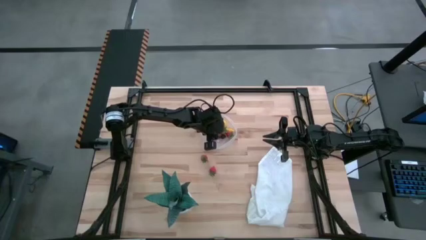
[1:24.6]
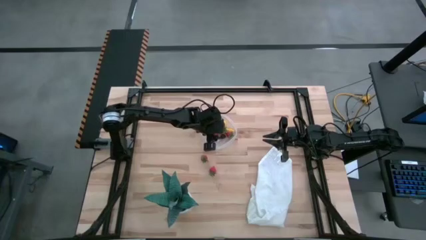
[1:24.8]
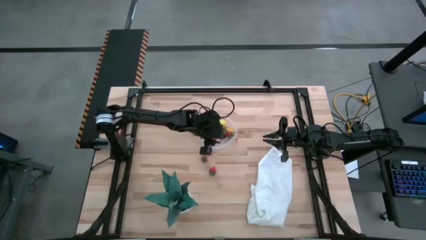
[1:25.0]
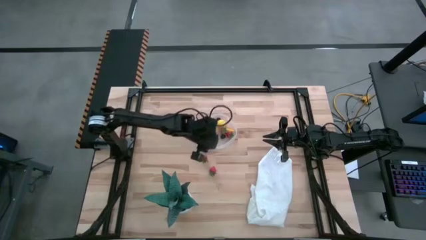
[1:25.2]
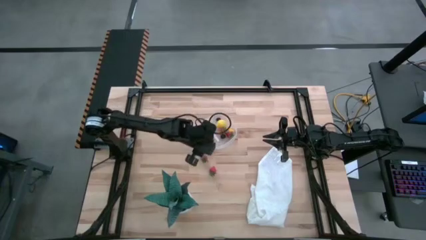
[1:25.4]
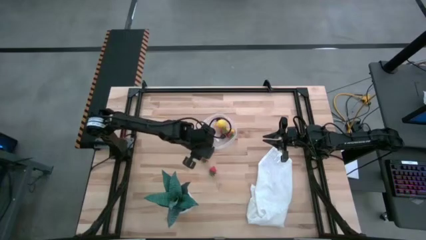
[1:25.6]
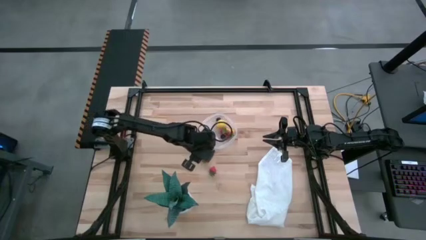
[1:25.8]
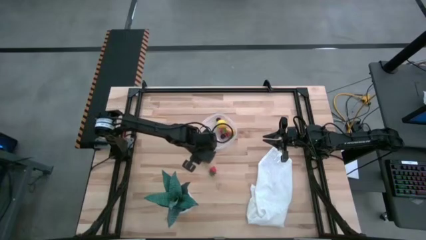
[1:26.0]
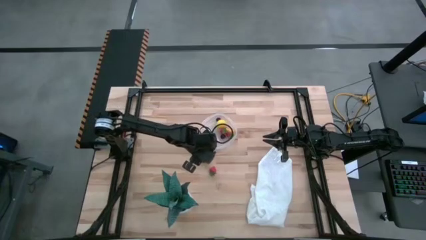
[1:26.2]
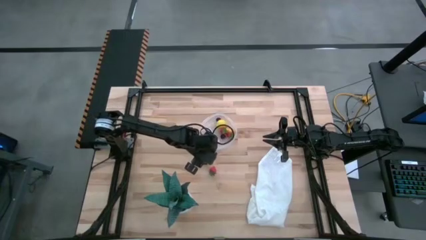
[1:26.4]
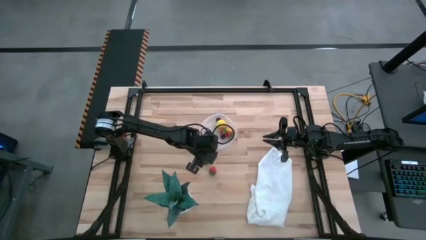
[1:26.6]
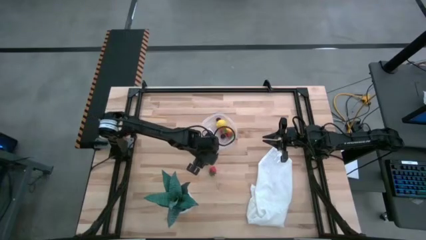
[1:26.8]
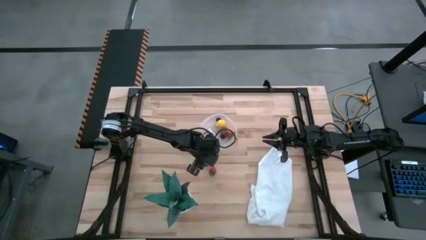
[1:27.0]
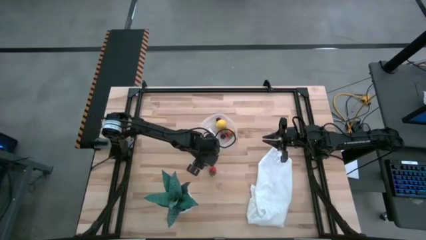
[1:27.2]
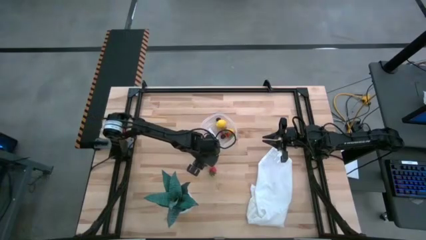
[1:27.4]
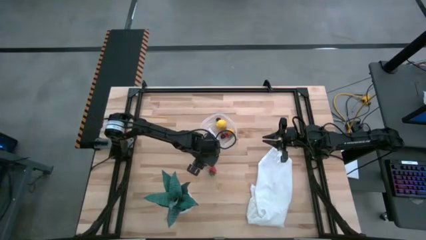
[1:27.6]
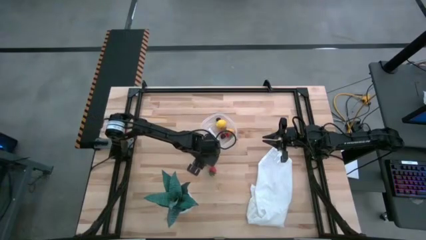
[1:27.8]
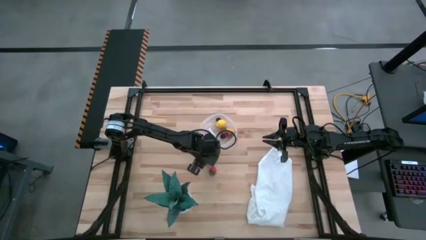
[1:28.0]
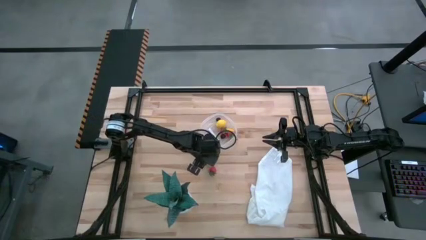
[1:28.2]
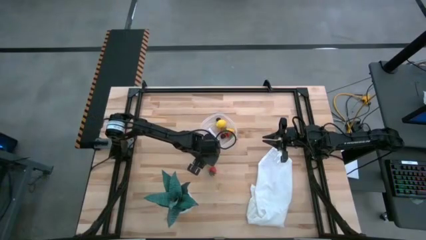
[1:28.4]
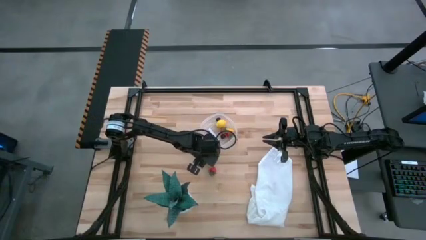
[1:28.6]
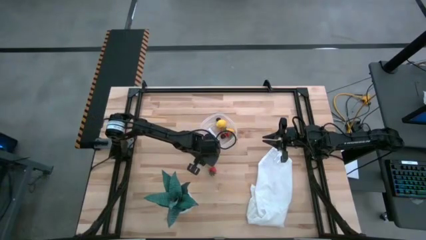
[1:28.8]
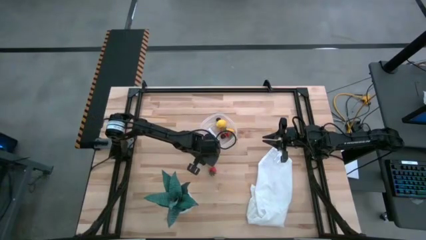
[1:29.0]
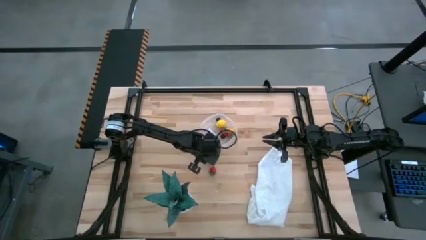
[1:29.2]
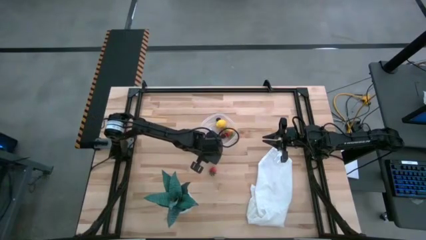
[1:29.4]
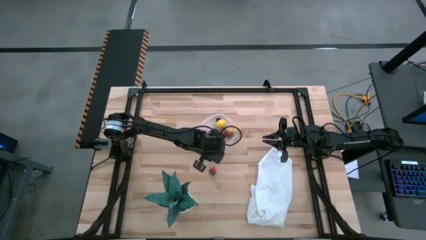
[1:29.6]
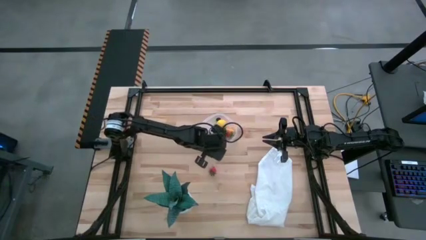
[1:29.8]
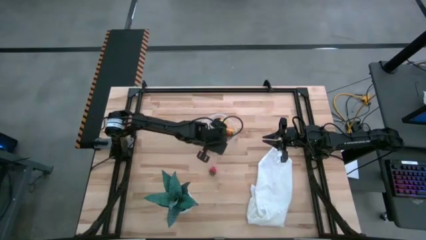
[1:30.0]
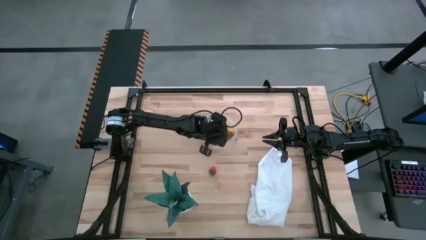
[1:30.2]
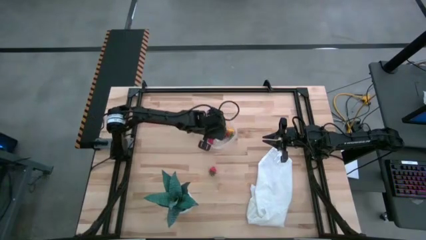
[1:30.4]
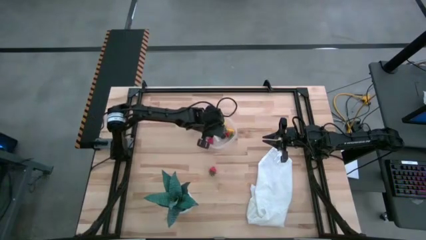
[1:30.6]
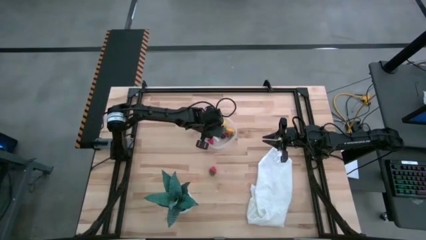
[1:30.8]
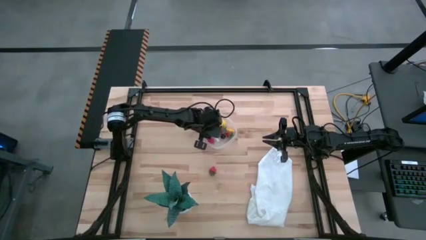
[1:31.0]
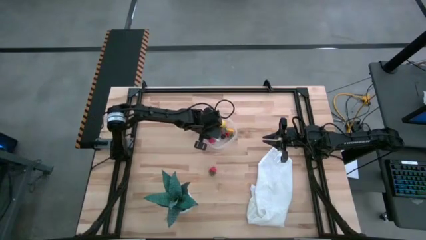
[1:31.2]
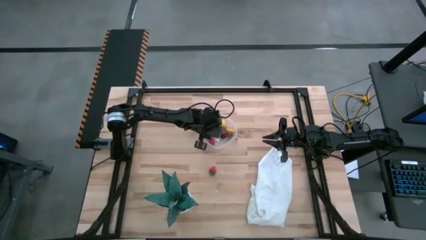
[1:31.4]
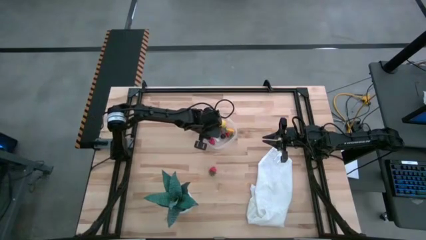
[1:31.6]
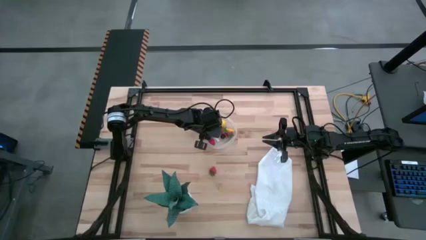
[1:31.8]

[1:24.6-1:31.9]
Task: Pick and placing Produce into tupperware
Put the strawberry into the bin

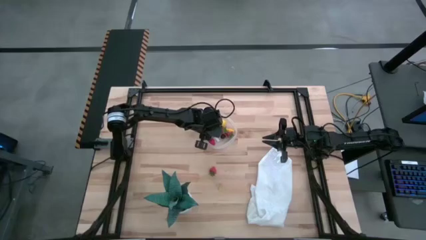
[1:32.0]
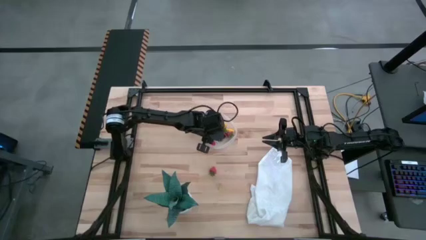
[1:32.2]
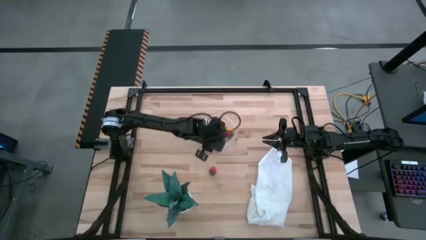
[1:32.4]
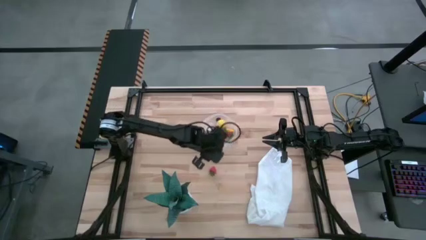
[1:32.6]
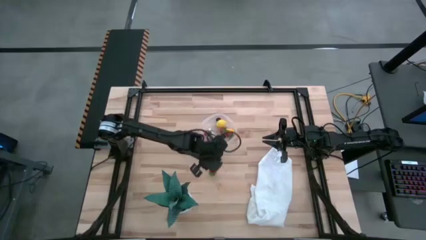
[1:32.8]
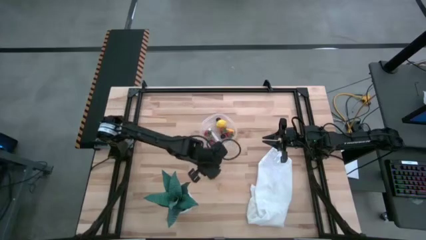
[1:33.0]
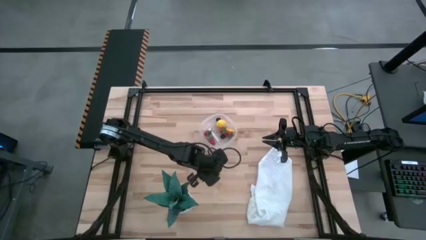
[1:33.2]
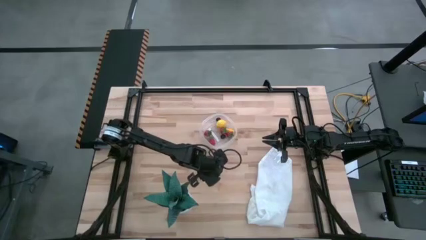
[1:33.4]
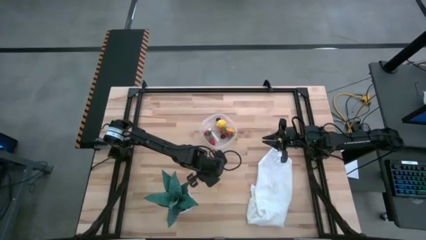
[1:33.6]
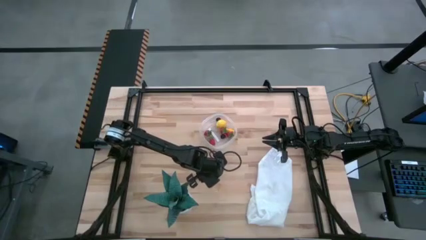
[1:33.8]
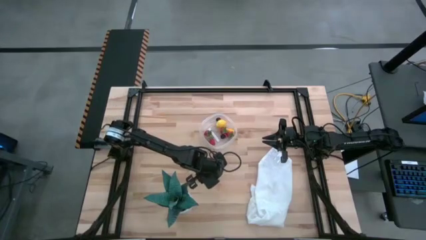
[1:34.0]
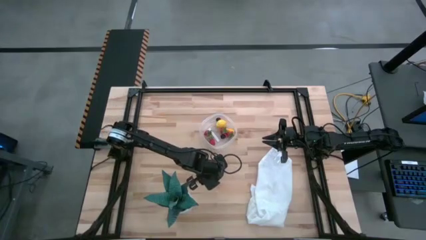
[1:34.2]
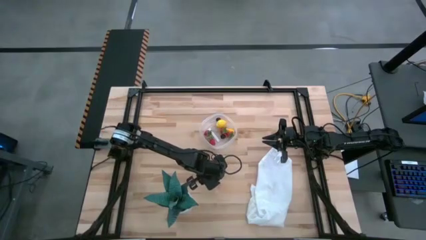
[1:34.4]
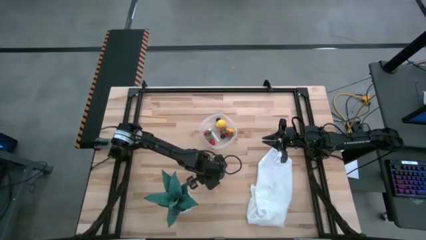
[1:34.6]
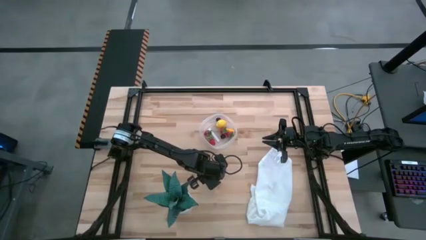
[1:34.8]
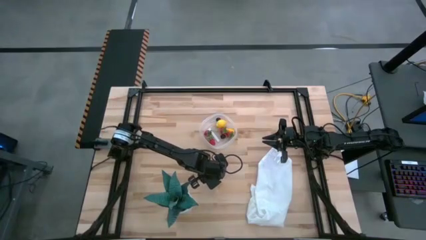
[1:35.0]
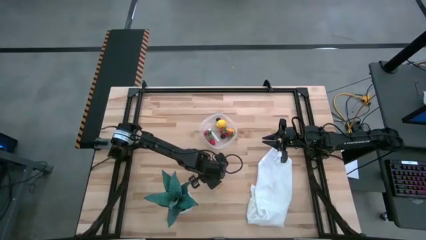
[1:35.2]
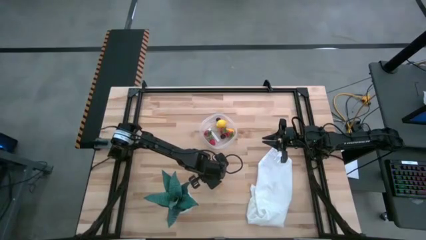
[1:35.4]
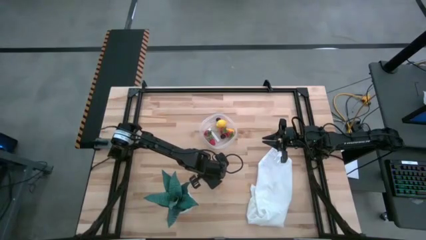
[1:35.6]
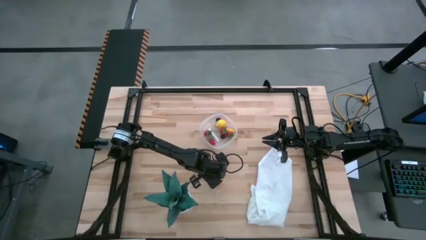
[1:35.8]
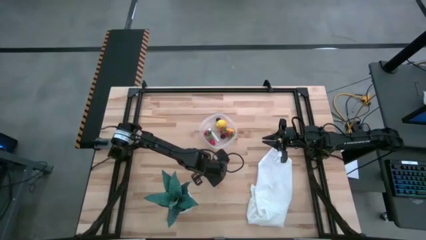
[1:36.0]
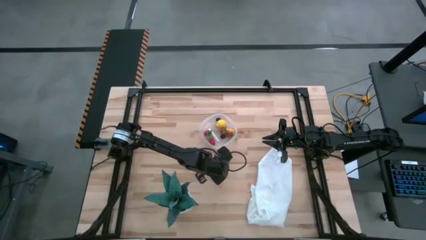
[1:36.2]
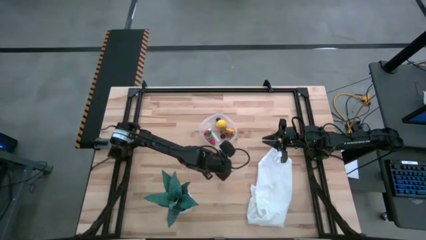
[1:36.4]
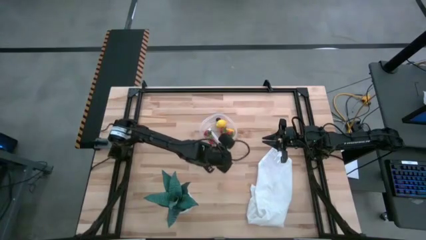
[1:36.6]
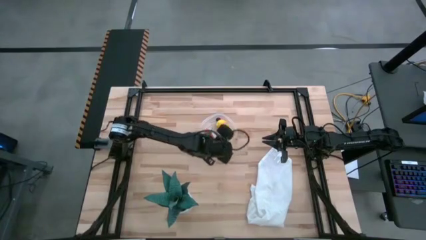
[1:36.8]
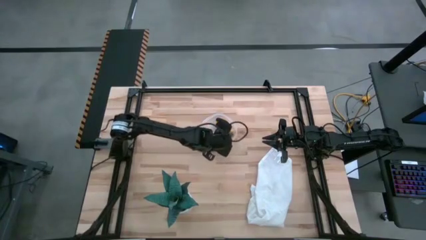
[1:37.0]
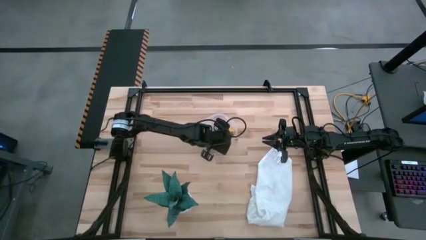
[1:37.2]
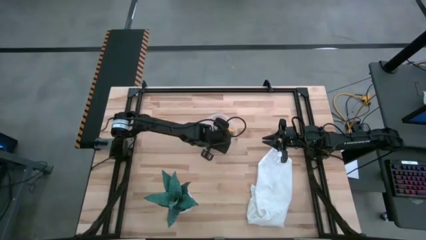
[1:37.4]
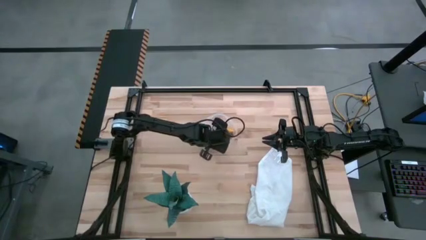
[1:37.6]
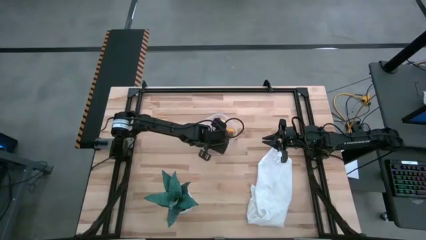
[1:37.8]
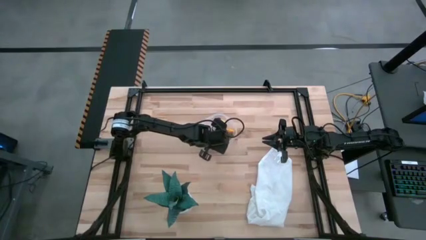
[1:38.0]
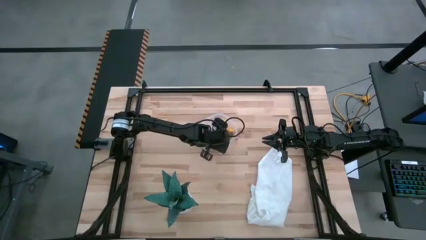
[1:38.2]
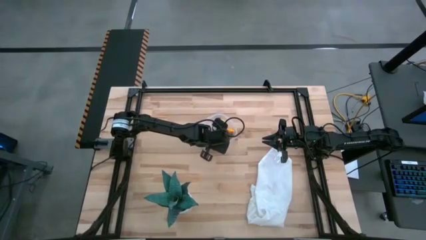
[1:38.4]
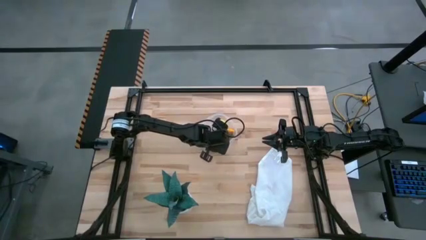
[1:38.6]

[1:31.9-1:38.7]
Put the strawberry into the bin

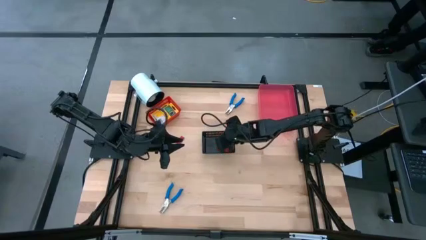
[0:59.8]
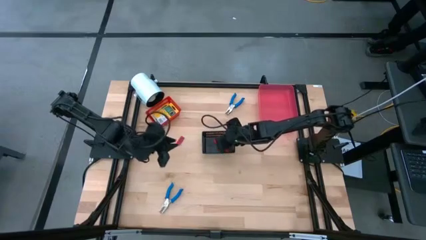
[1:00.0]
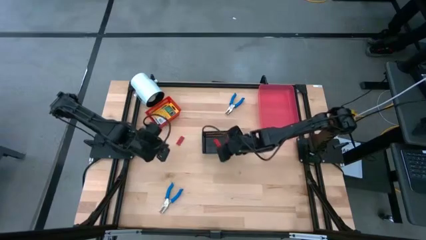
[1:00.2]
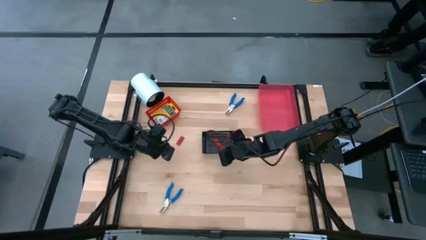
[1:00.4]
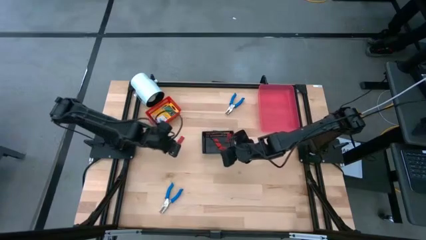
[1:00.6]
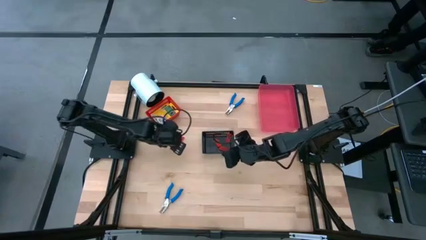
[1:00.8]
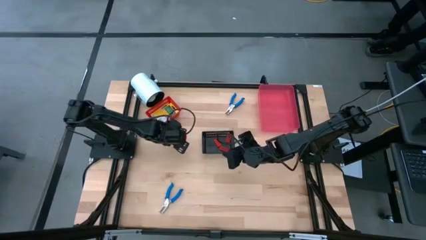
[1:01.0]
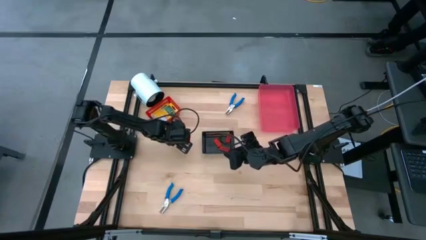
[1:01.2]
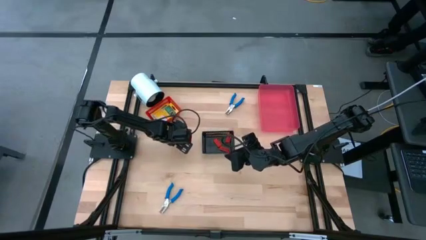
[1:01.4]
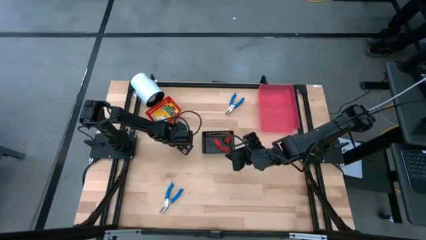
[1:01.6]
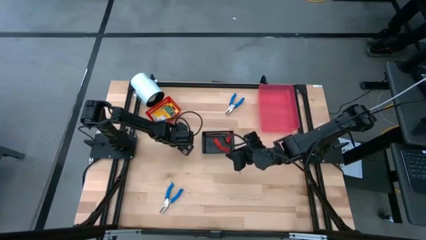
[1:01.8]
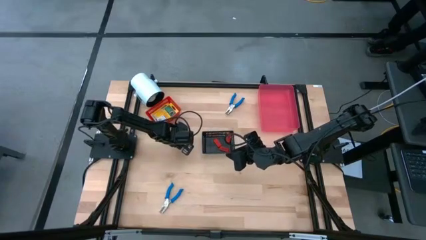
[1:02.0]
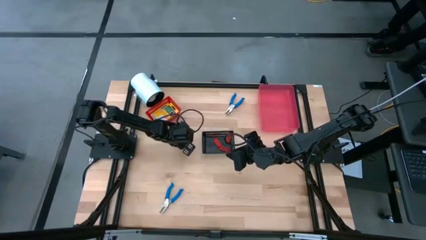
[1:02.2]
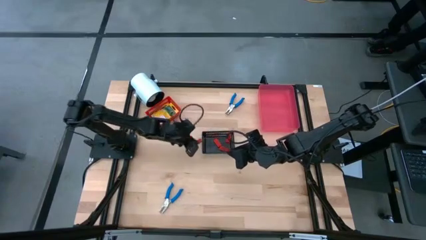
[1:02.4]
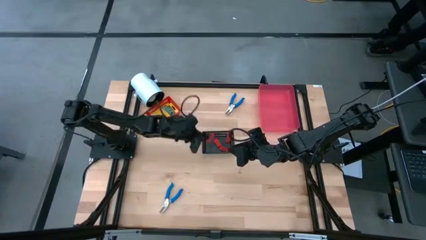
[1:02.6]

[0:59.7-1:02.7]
Task: Pick & Place School Supplies
Put the red eraser into the black bin
